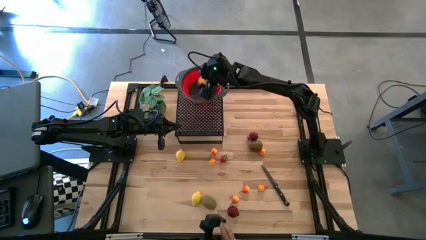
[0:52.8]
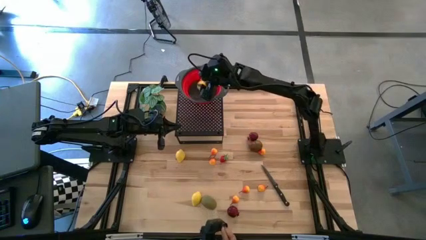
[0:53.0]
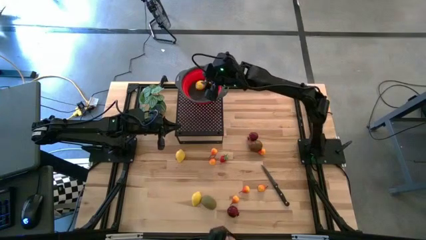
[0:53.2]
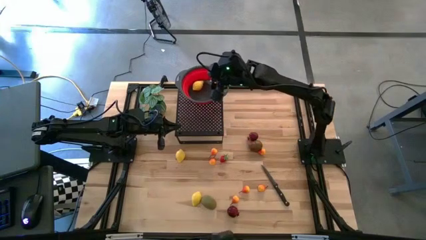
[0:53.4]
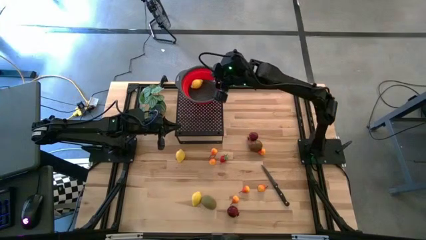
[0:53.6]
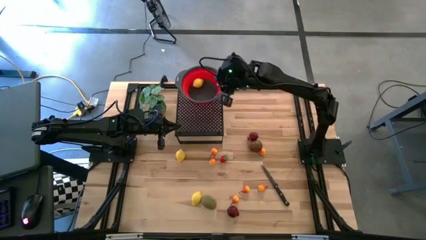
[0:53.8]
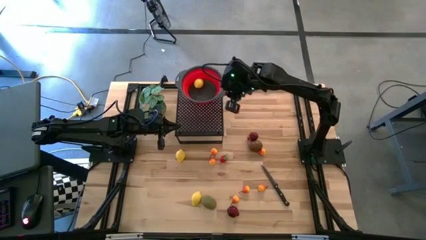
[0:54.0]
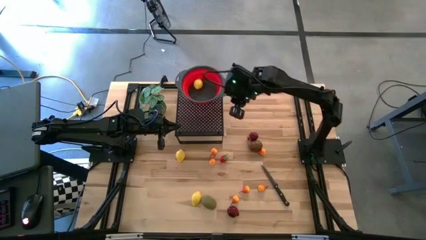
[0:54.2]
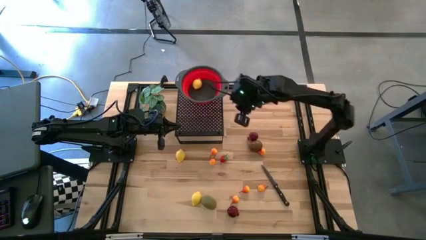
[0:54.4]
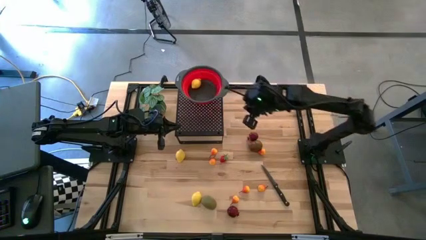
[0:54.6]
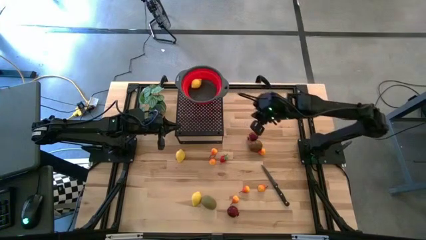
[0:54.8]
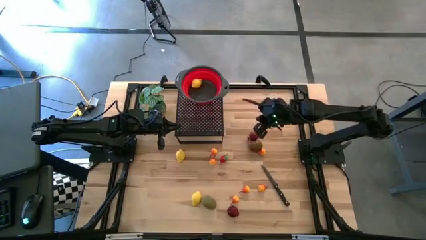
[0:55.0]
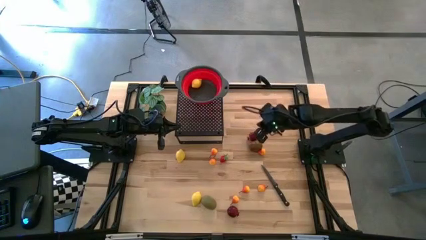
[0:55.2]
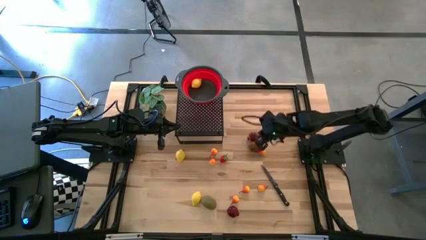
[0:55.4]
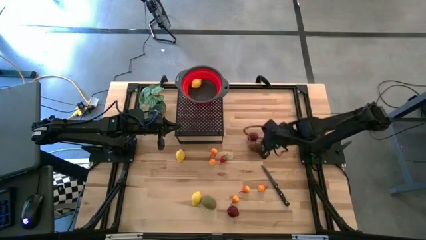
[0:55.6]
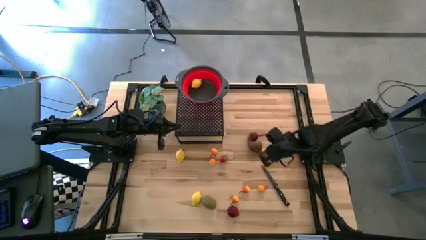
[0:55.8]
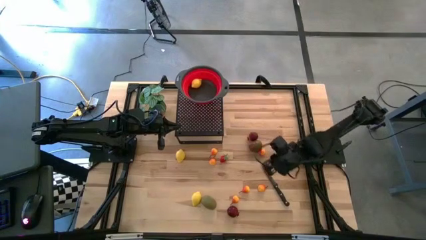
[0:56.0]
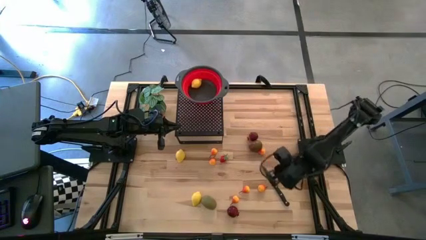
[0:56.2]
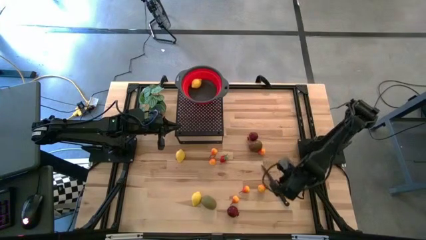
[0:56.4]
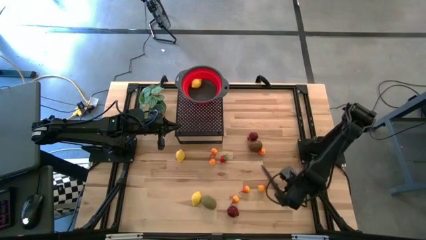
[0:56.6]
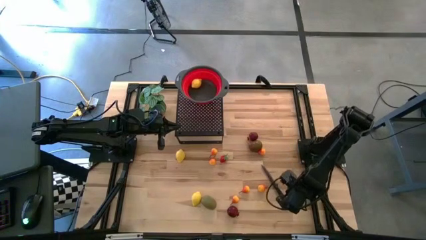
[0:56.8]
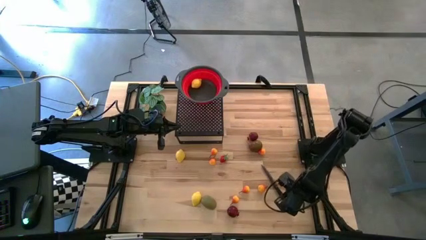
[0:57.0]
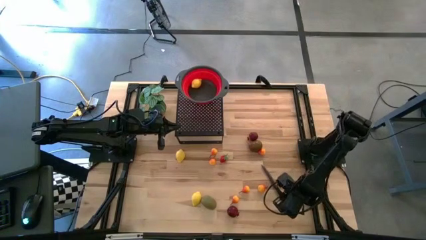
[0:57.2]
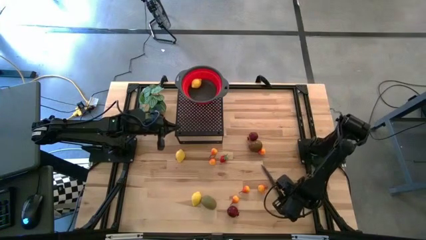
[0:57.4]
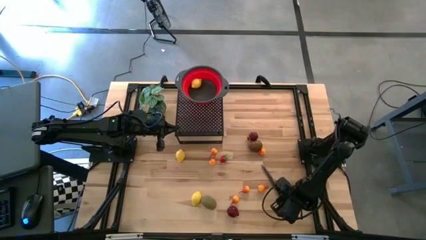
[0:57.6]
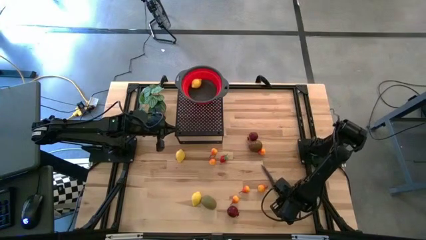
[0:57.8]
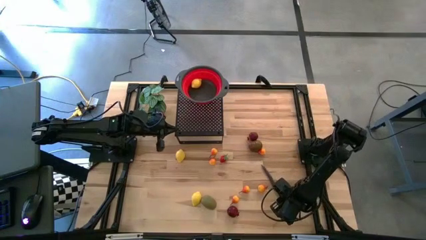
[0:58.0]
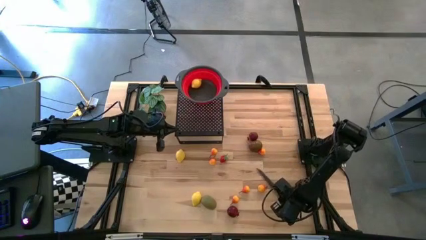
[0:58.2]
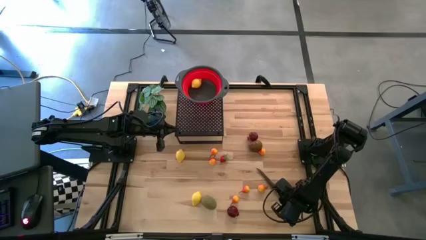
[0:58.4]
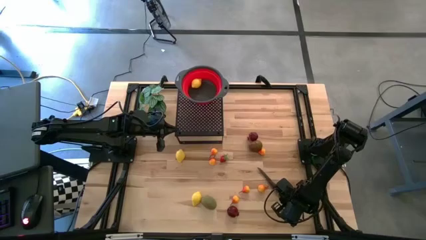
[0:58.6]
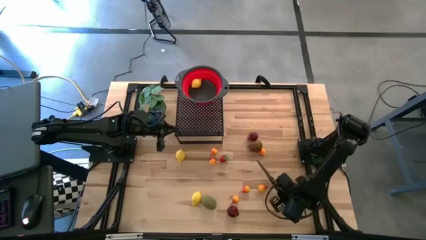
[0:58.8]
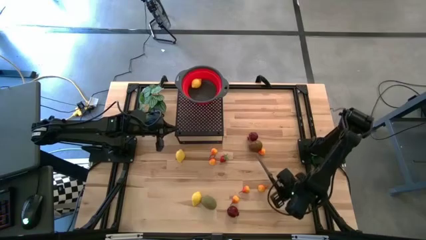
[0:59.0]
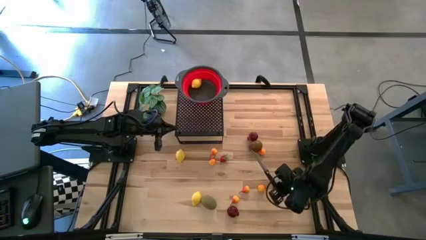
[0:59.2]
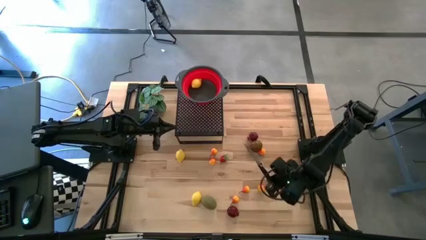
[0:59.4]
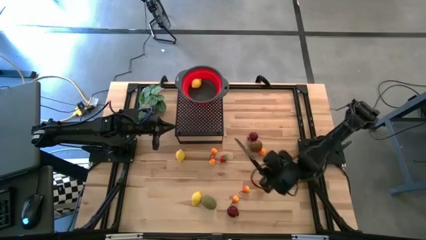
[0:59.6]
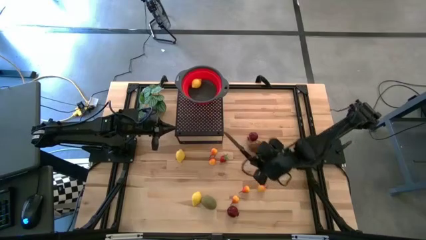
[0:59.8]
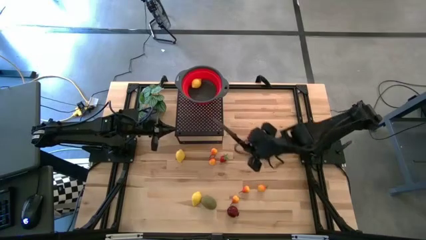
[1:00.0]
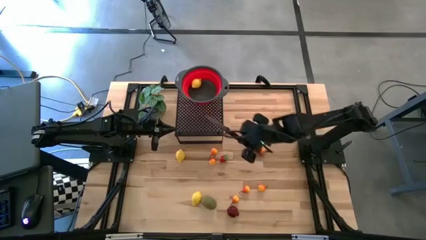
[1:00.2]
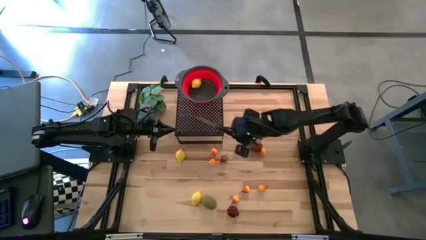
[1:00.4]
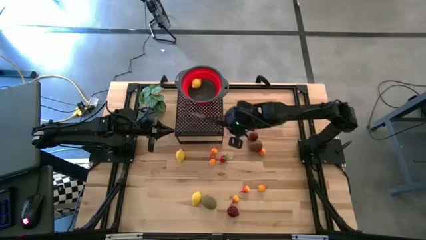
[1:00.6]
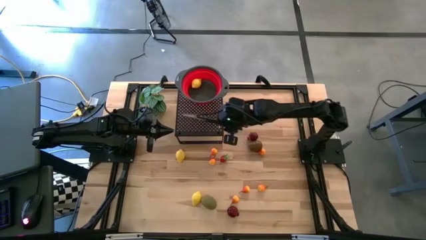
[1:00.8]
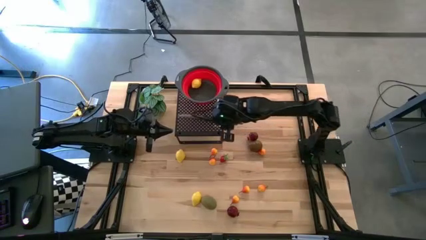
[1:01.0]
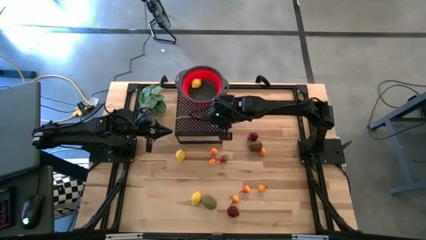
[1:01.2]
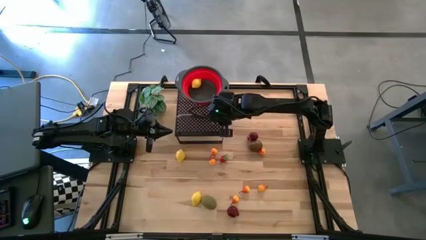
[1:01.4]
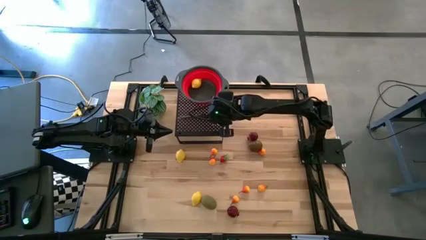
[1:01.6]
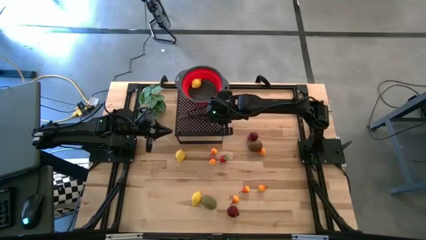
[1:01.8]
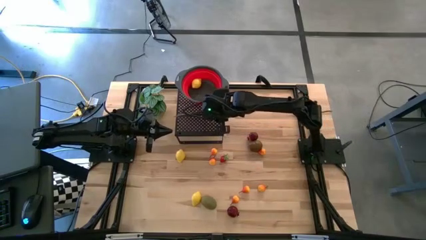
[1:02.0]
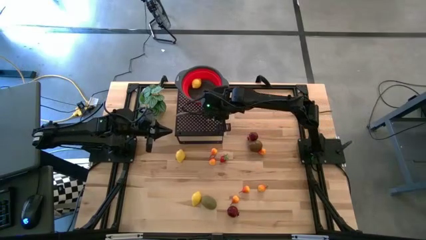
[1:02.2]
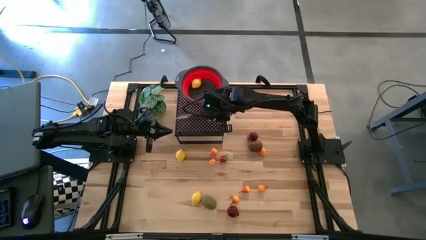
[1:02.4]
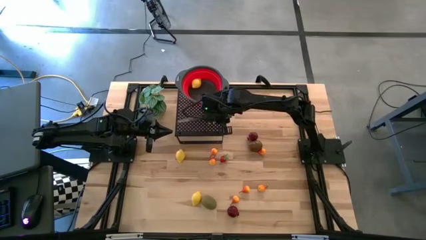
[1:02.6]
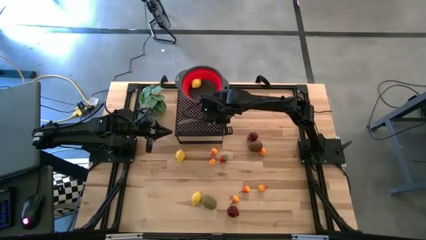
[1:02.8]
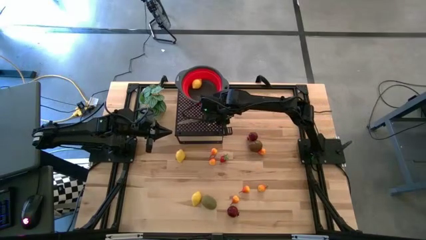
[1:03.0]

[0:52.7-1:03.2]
Task: Pick & Place Fruit
Put the black knife on the shelf

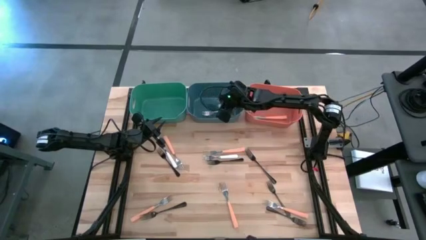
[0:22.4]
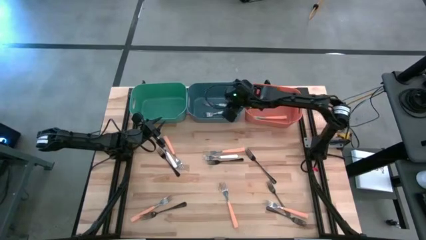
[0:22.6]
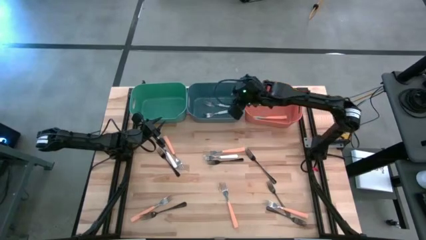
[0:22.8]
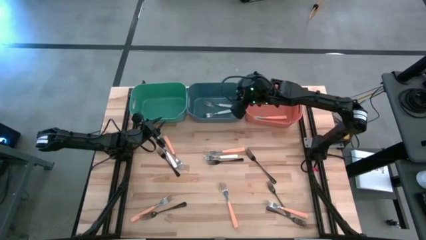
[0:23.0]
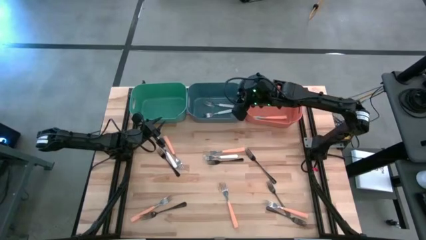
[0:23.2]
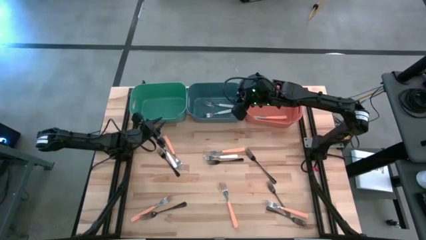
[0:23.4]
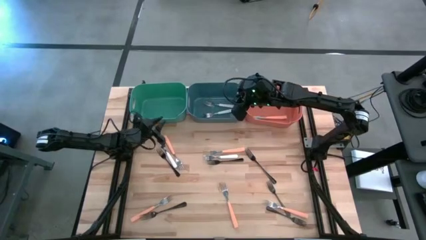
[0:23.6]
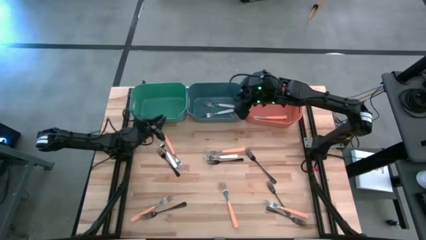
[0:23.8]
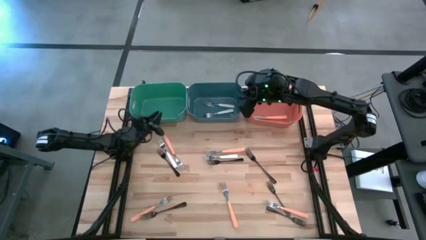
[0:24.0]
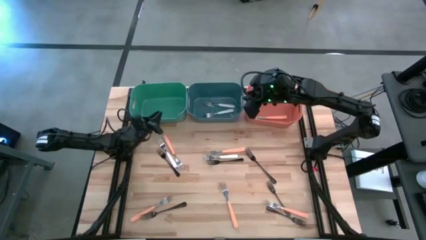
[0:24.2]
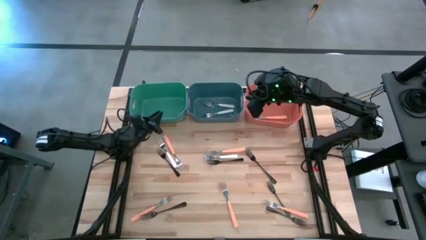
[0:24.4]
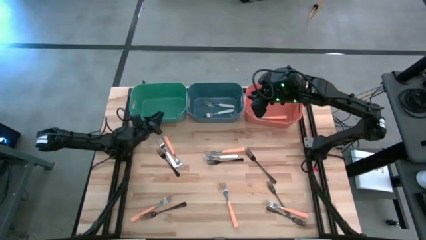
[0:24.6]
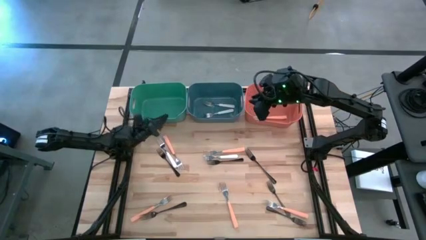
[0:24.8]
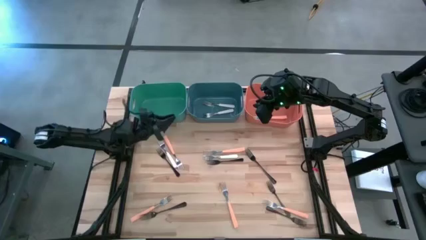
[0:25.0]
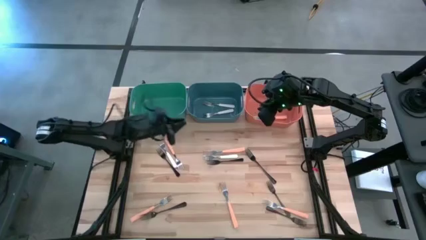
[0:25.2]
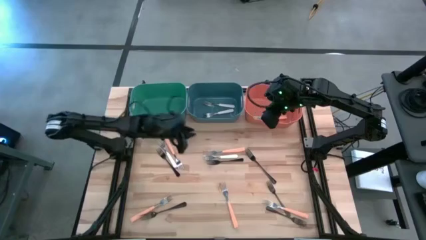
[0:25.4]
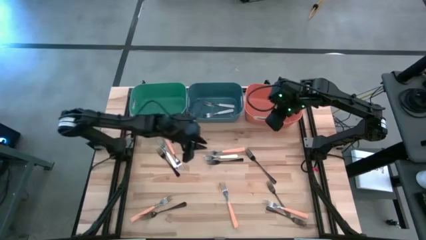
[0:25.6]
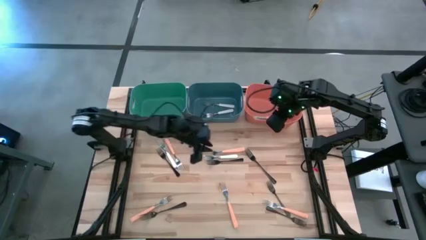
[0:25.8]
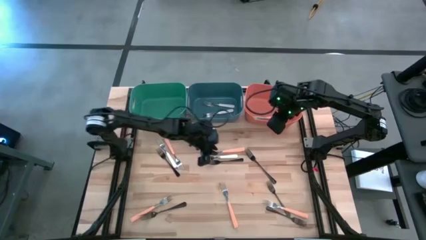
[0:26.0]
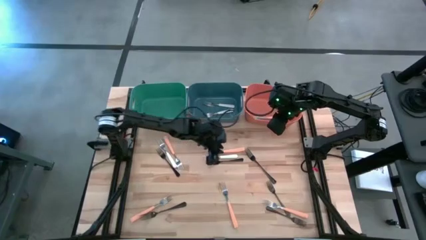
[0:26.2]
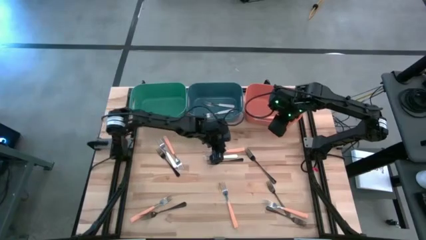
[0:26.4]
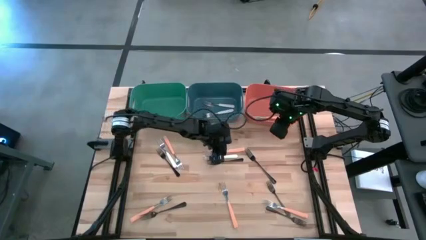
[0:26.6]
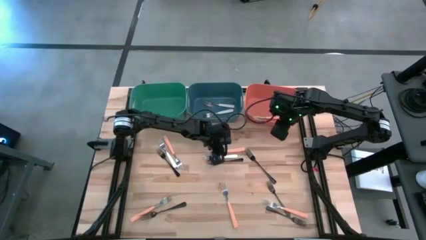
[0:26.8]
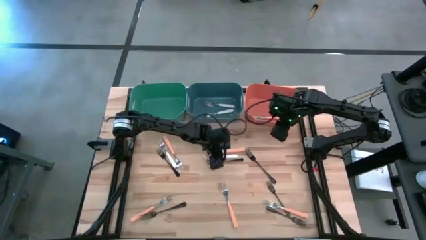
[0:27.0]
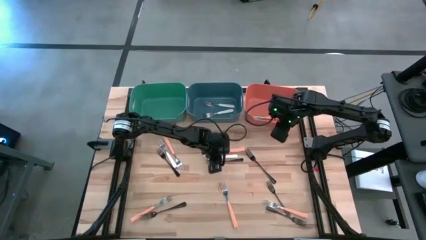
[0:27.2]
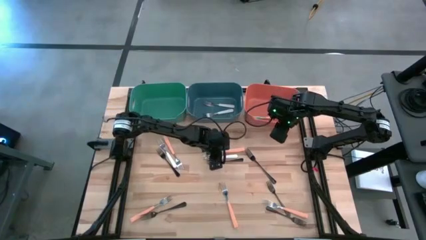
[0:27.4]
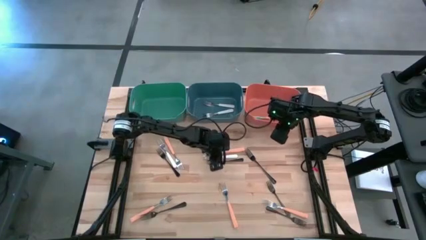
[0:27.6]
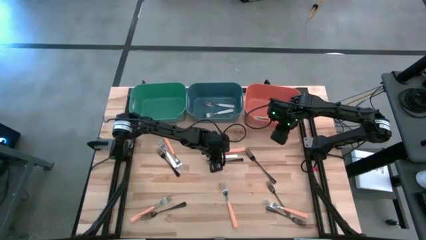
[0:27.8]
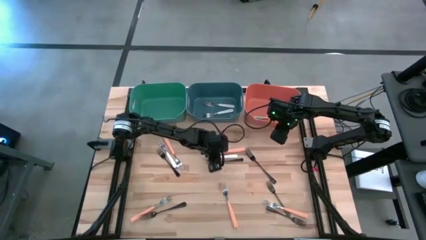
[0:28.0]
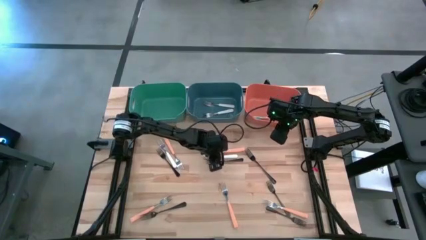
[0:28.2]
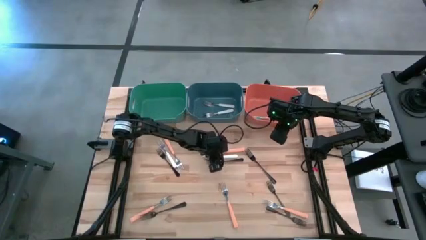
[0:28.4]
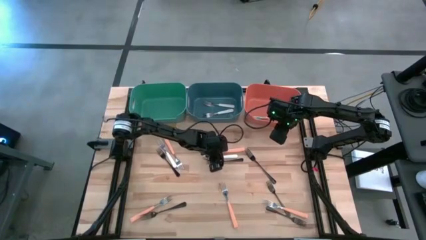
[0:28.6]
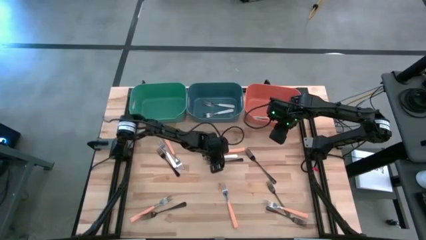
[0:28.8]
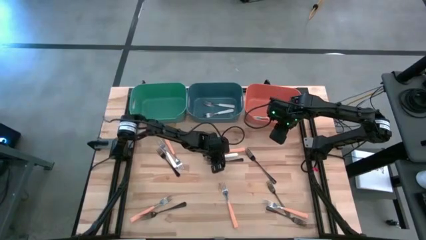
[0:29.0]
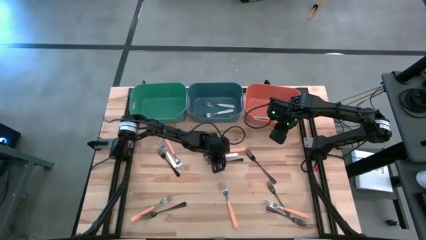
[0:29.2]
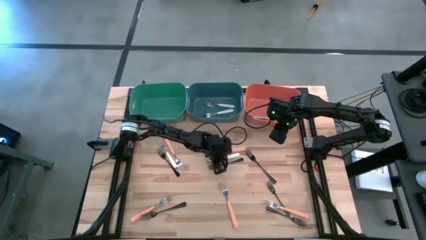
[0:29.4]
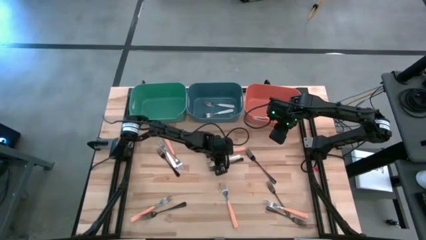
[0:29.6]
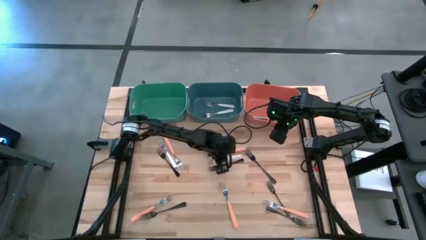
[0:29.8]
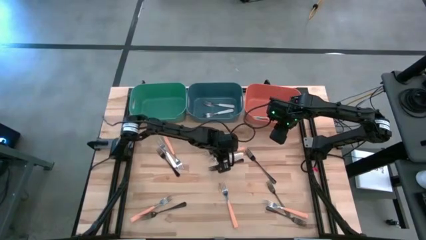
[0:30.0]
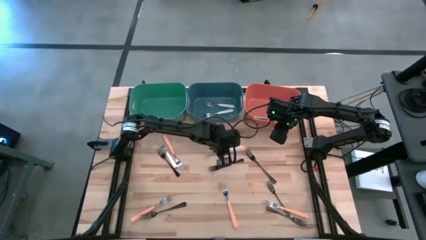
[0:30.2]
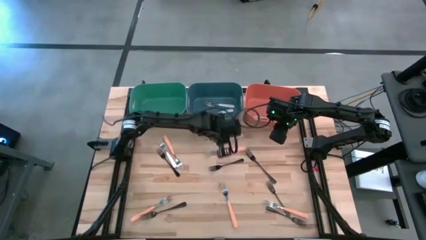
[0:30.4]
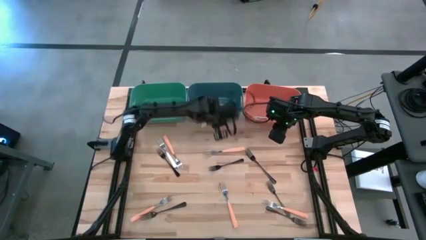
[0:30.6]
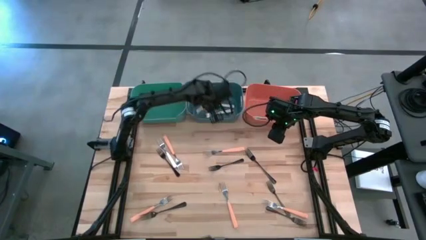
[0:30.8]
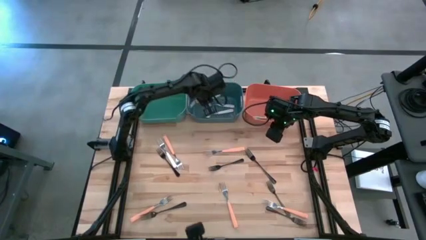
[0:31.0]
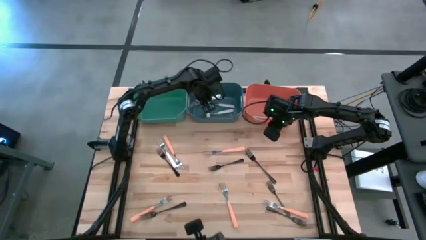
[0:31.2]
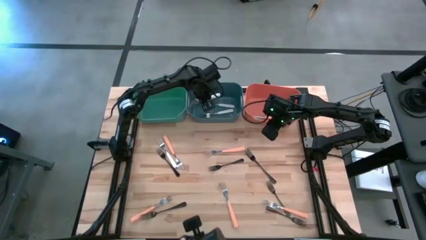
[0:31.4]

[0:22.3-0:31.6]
Task: Sort silverware by color (type)
Put the white fork into the blue bin
